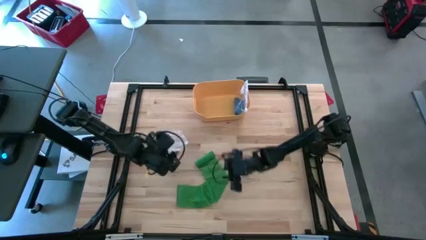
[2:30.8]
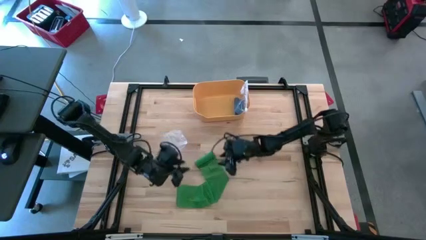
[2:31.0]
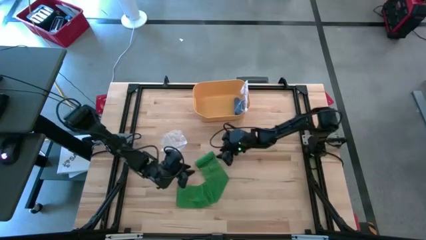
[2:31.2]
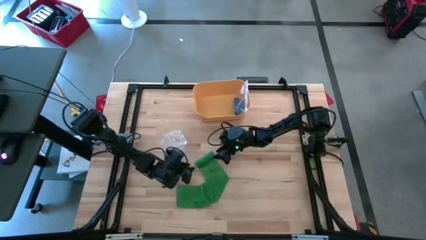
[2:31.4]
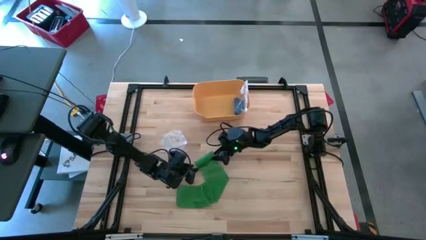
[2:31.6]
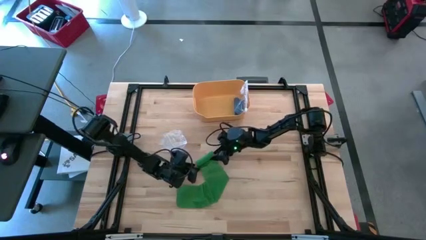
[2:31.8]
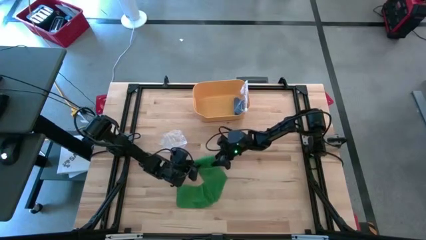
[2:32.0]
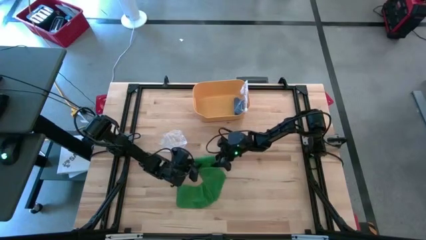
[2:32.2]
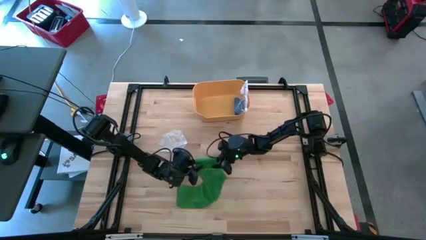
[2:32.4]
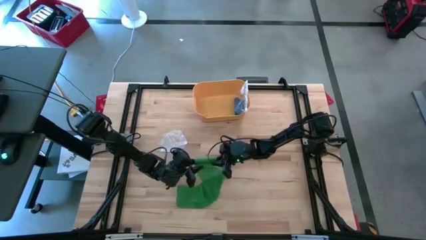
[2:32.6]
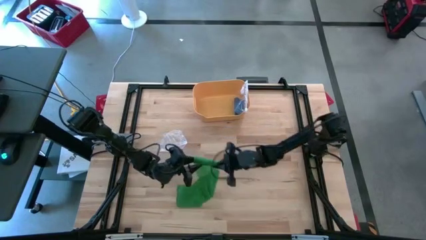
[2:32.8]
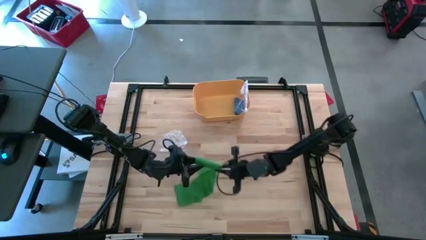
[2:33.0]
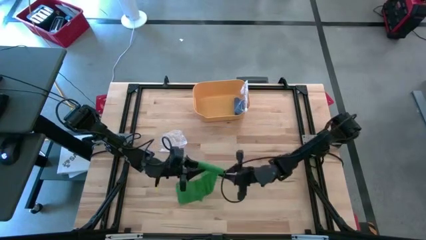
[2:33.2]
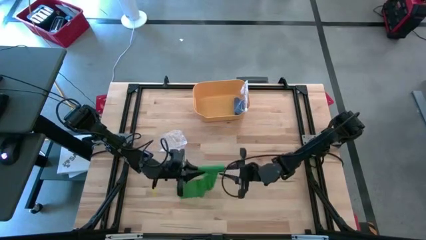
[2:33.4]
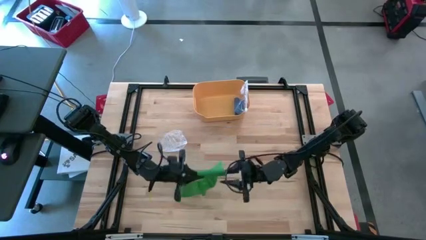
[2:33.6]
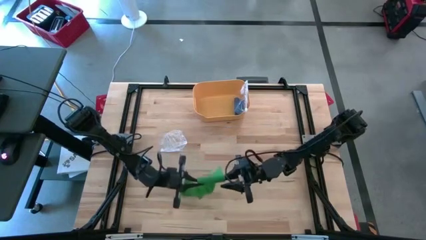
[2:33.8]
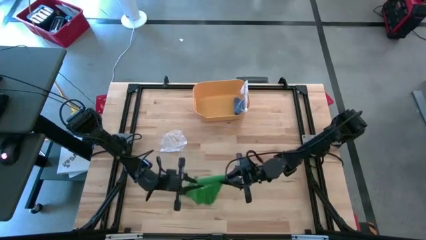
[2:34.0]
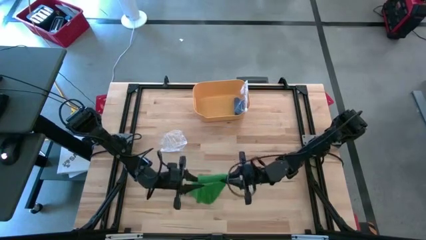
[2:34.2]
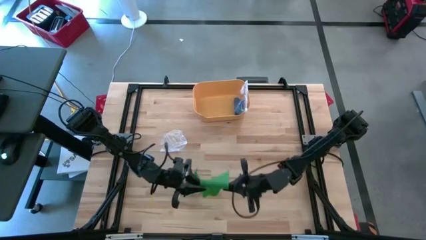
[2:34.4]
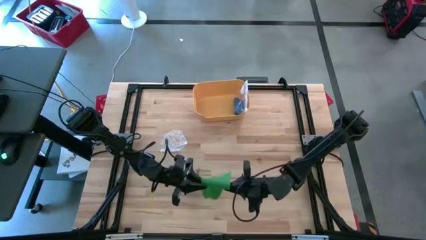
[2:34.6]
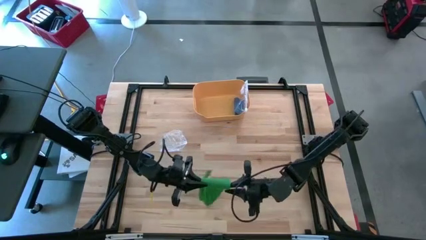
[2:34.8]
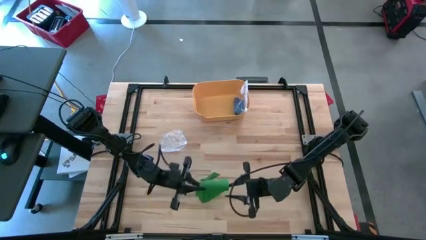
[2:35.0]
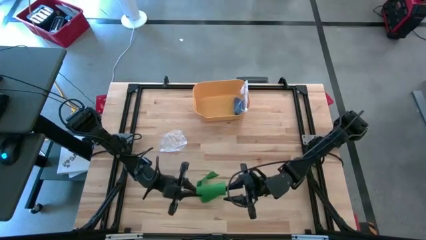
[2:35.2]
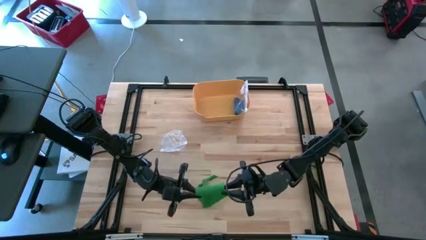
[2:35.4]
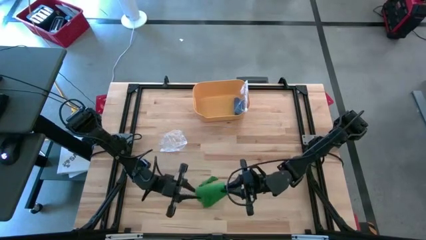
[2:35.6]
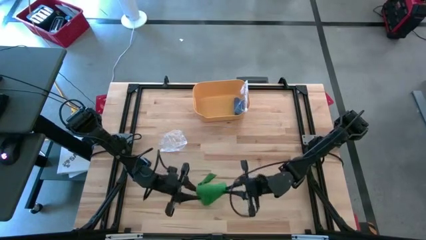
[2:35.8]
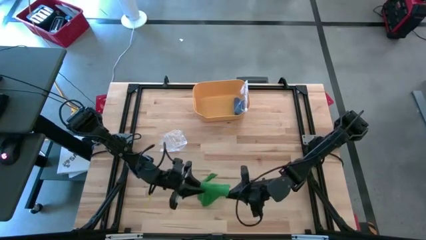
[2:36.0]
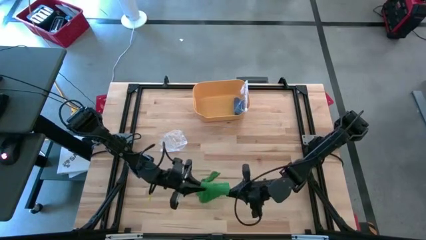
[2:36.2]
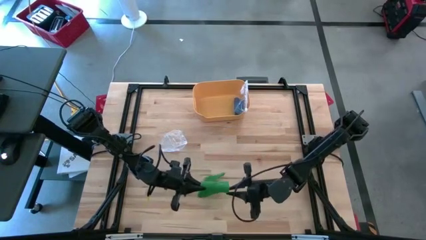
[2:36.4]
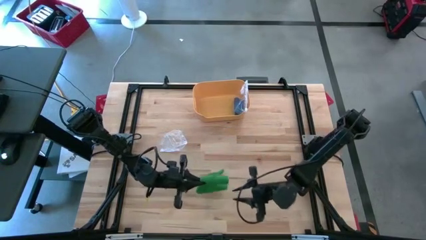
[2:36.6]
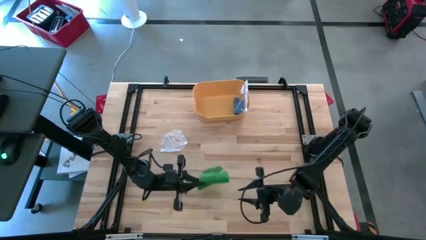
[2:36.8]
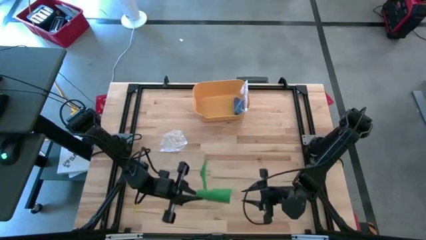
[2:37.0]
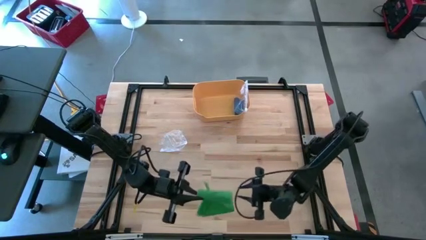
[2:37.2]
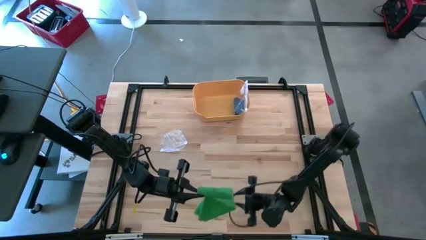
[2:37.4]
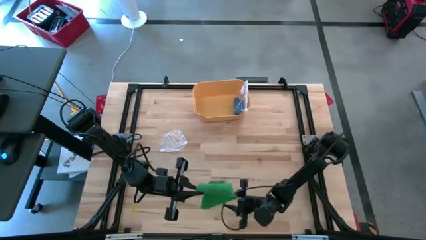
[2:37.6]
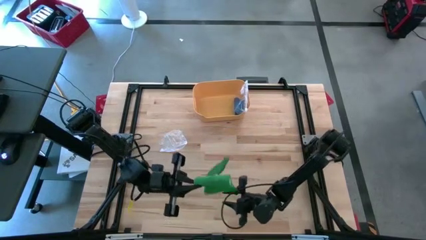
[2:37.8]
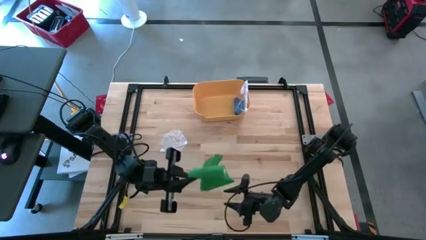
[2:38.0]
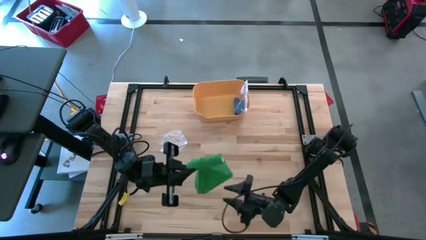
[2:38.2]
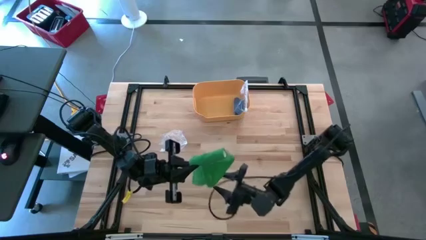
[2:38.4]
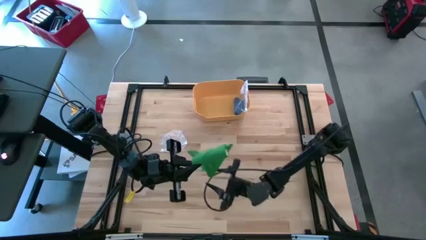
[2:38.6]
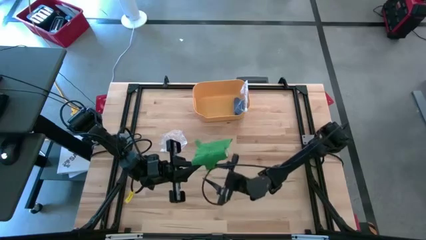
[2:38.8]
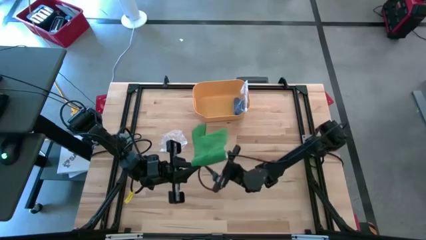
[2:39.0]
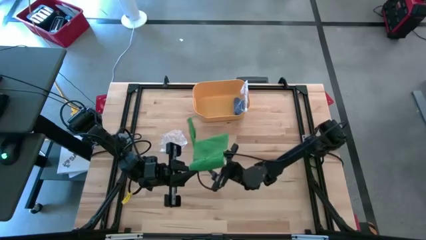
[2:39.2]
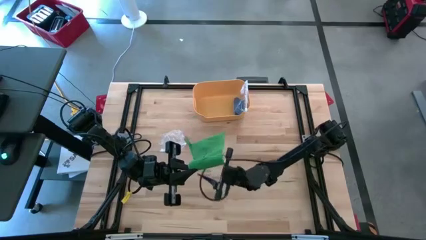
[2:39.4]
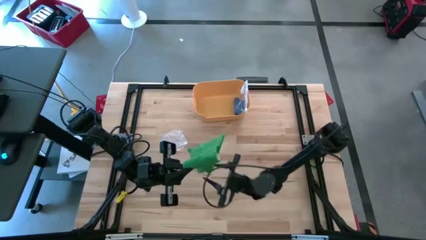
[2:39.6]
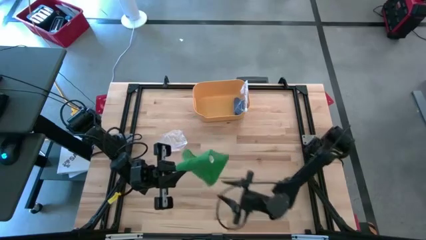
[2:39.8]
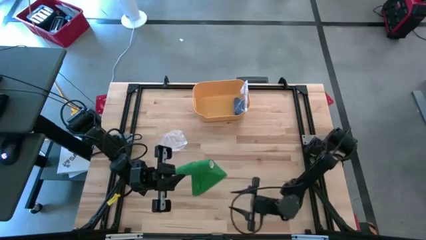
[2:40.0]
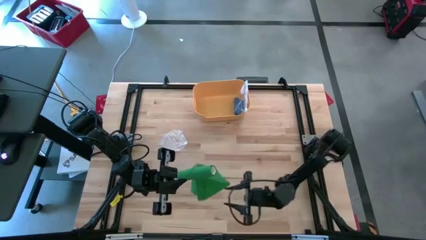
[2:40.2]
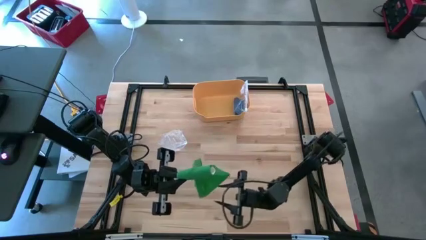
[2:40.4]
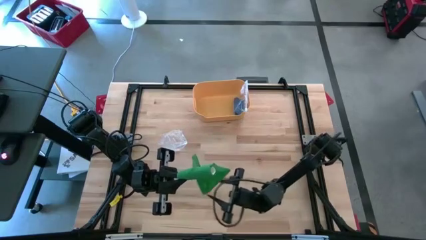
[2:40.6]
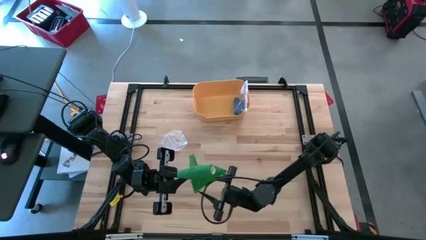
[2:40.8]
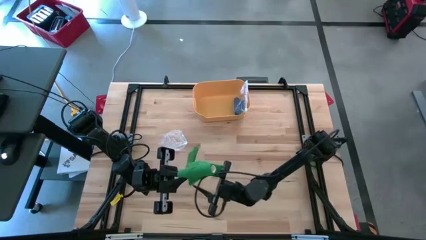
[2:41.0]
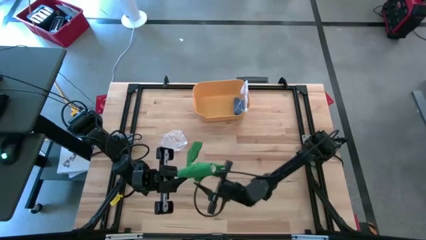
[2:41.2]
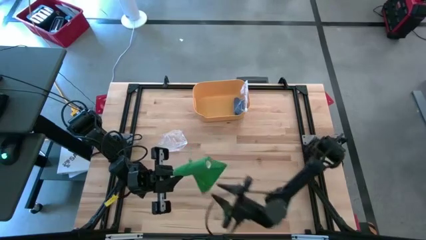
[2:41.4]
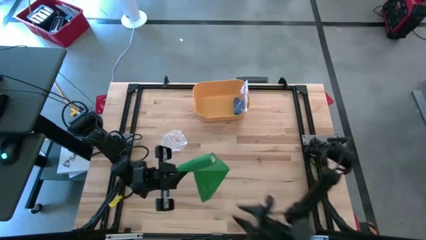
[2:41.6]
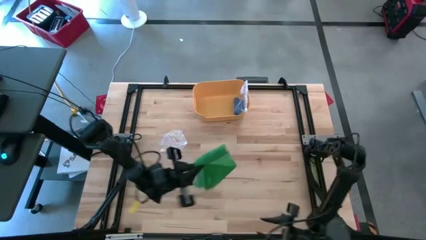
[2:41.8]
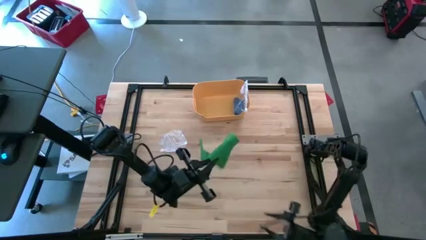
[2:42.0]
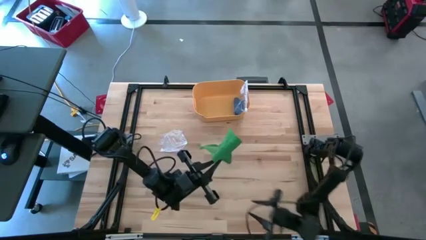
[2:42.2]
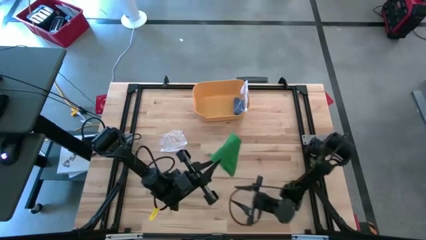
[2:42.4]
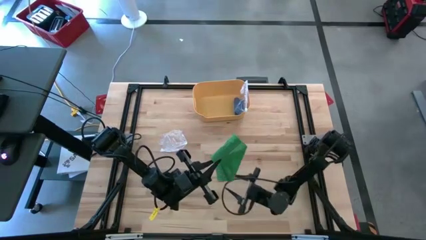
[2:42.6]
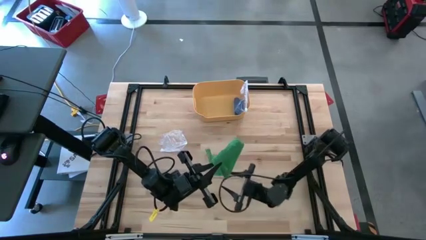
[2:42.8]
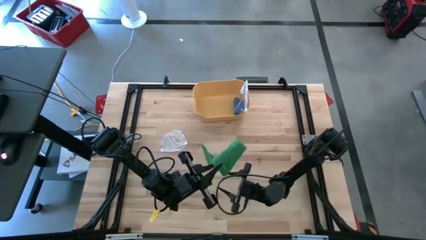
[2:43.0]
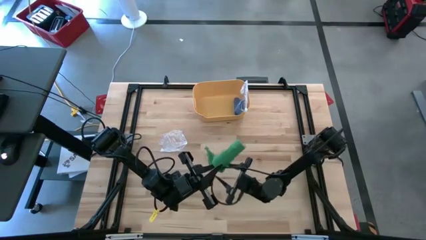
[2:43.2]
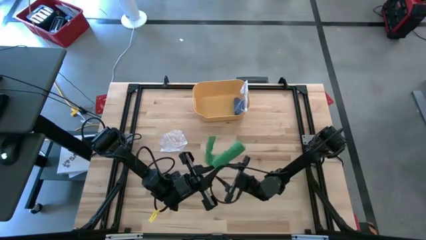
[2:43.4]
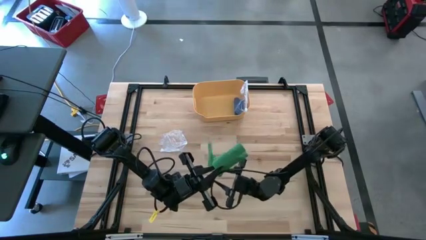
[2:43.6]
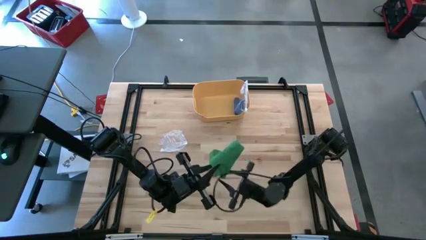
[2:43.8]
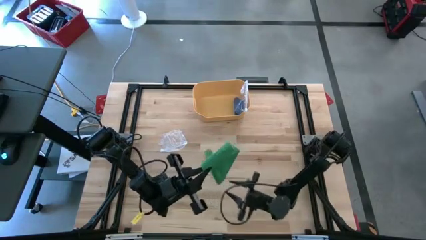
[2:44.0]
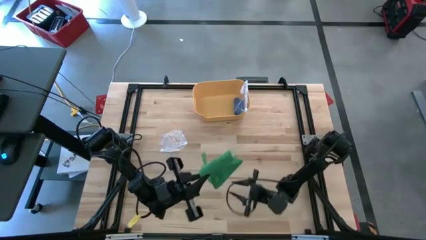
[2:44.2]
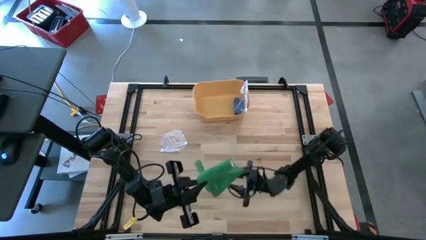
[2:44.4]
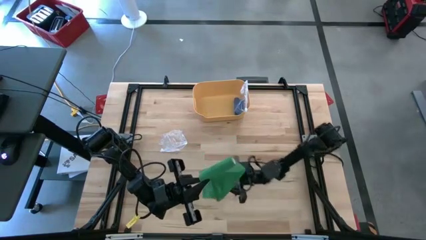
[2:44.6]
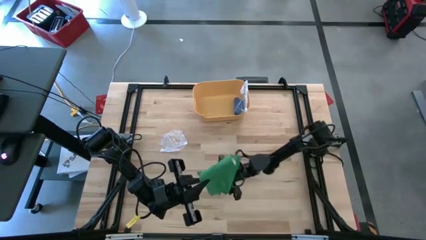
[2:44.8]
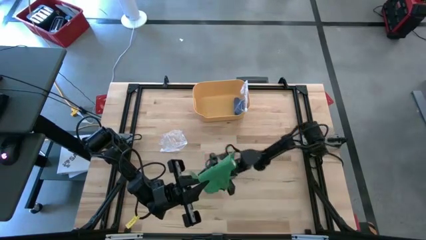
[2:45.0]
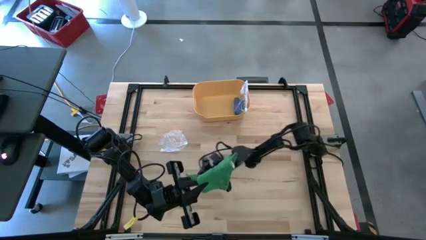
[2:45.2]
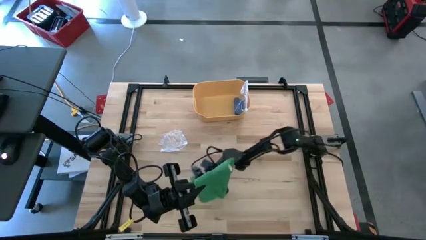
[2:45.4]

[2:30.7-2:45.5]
Task: Roll bandage
Roll the green bandage
